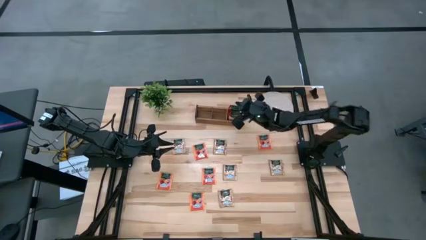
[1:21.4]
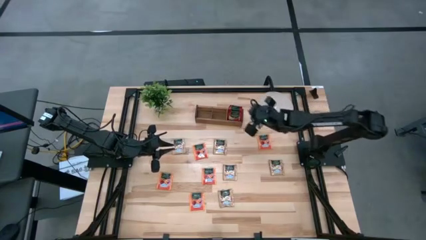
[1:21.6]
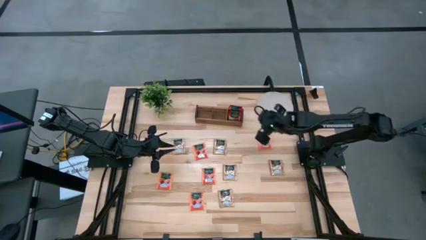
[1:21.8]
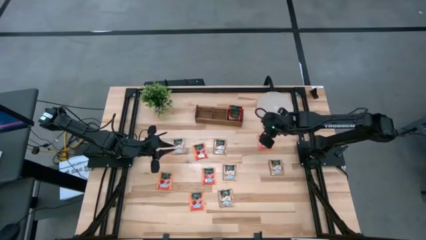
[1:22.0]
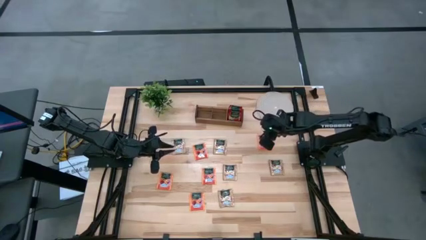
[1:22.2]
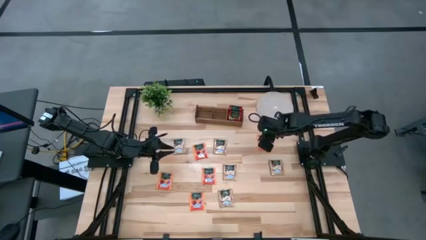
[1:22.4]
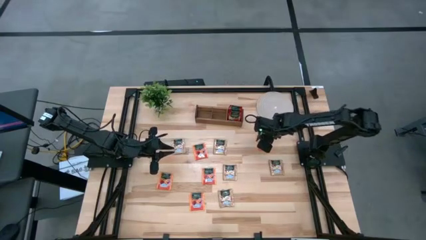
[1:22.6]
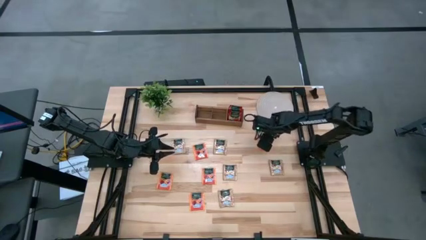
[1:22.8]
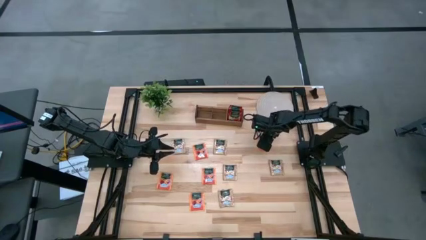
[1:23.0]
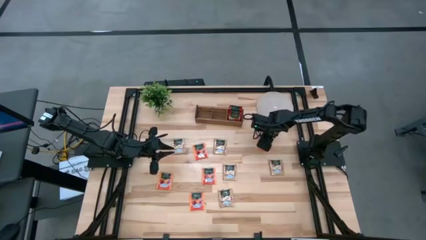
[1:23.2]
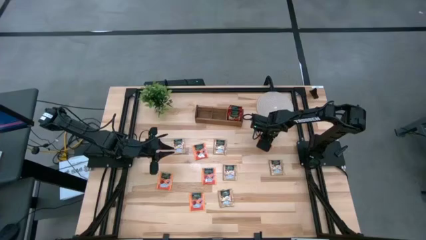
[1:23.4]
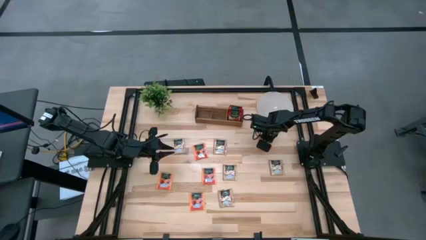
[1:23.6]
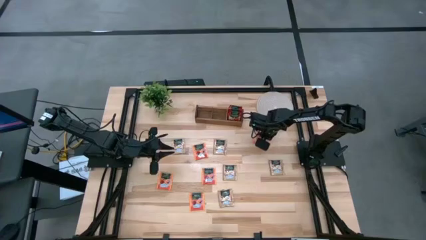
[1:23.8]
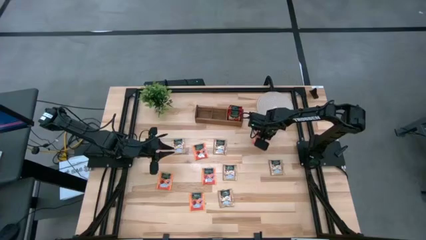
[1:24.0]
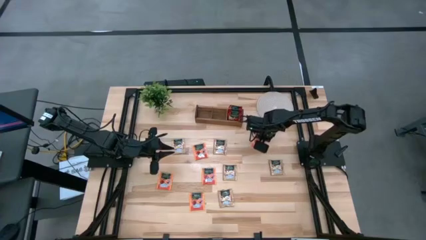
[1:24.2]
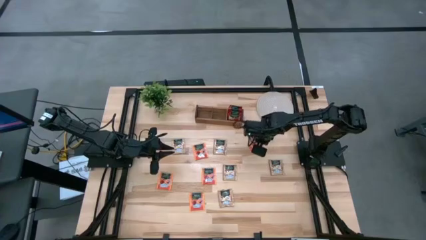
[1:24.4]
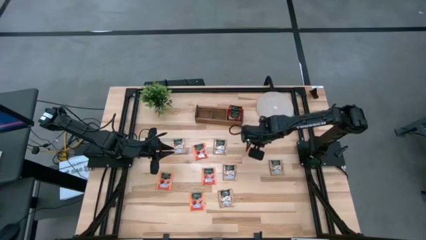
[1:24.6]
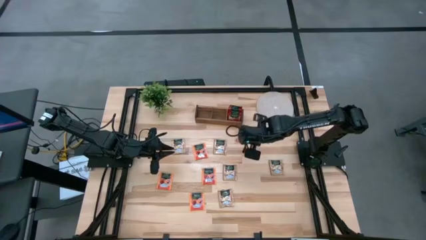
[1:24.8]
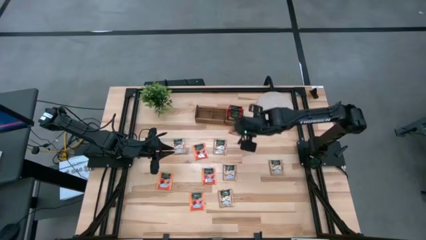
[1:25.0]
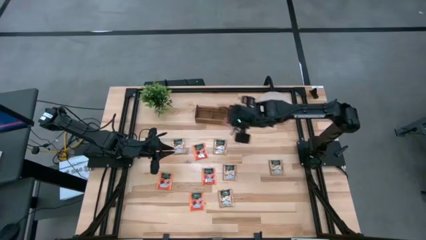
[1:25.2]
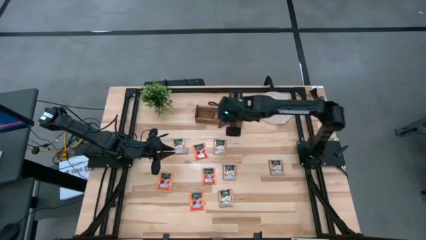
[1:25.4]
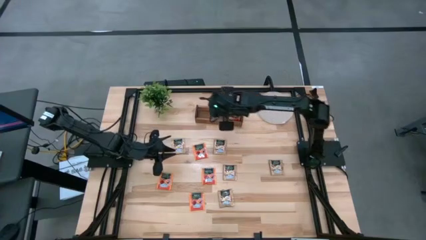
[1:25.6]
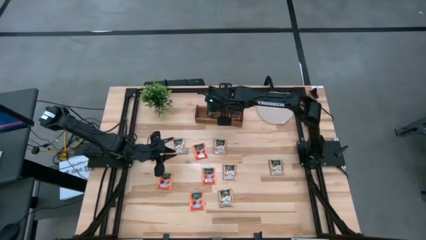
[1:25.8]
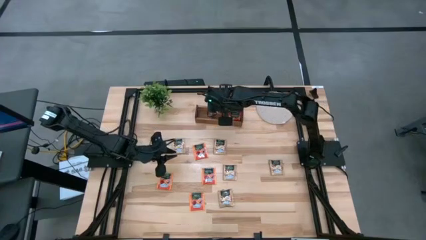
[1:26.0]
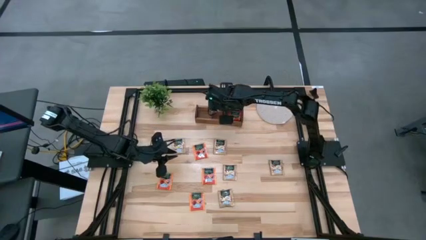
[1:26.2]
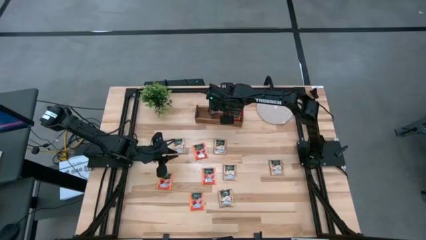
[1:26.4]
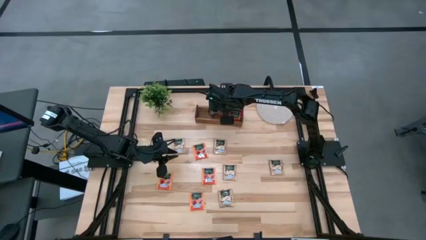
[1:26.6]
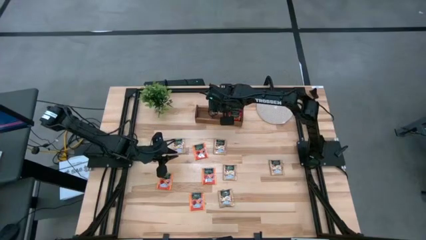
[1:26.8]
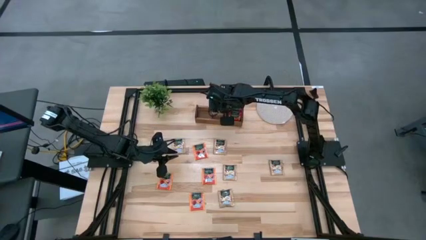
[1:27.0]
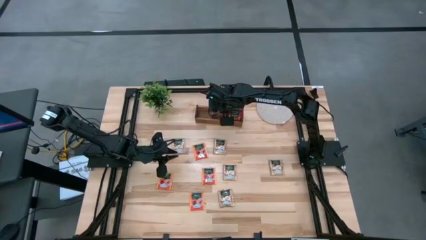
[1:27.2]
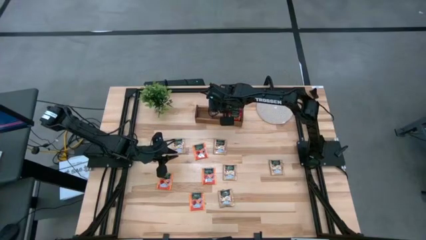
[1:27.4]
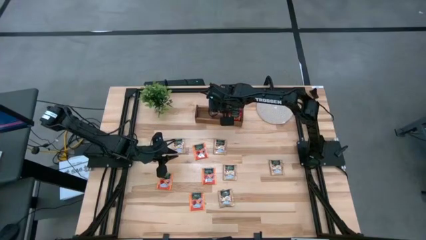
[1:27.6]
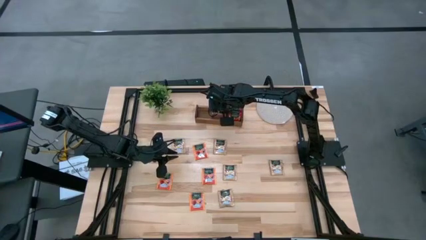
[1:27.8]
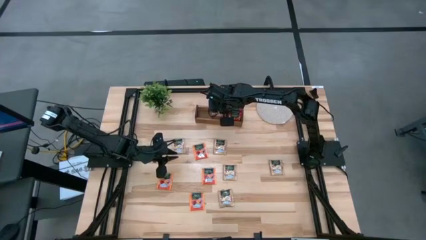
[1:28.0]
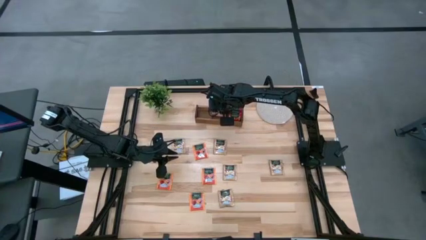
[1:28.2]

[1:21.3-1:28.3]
Task: Pick & Place Tea
Put the orange tea bag into the middle section of the wooden organizer

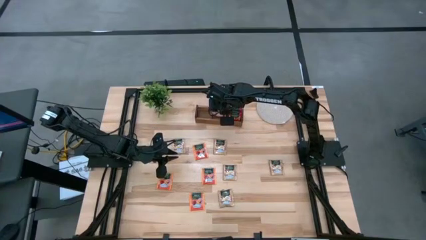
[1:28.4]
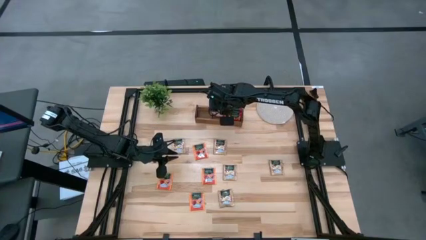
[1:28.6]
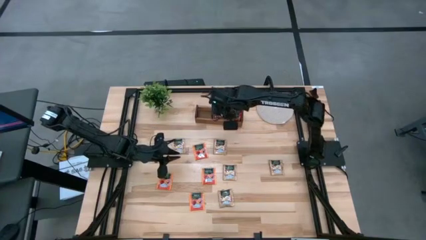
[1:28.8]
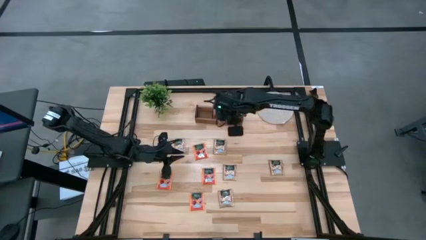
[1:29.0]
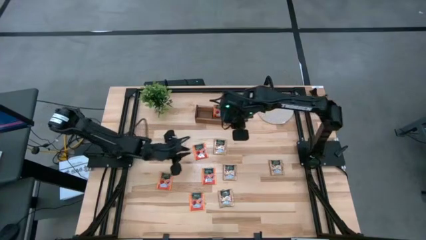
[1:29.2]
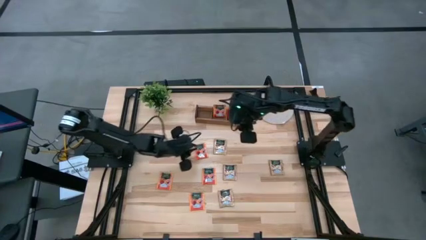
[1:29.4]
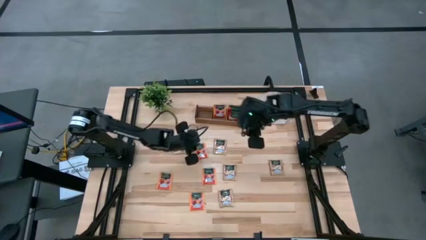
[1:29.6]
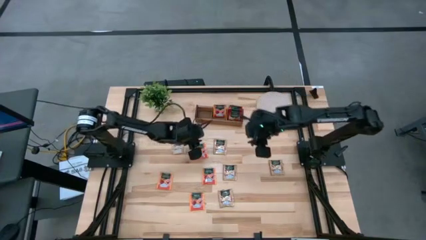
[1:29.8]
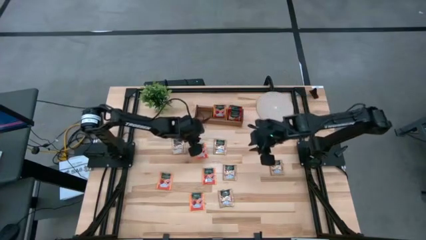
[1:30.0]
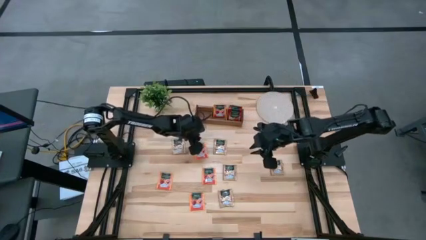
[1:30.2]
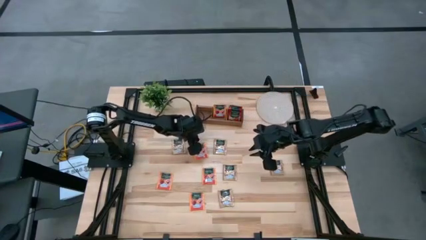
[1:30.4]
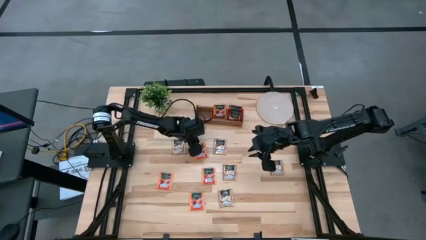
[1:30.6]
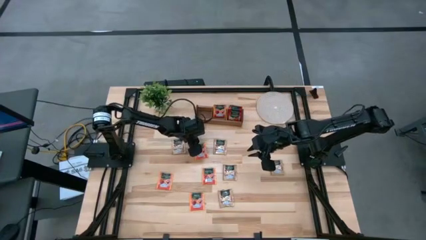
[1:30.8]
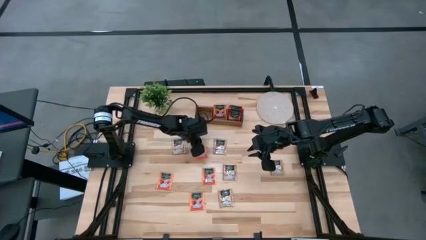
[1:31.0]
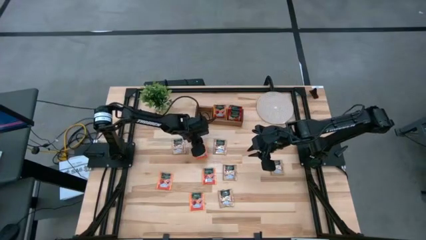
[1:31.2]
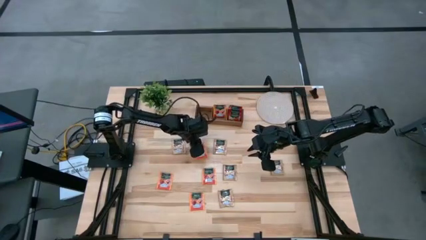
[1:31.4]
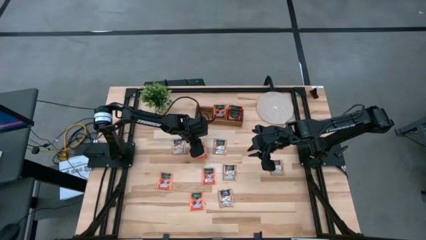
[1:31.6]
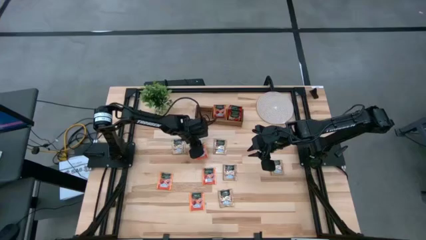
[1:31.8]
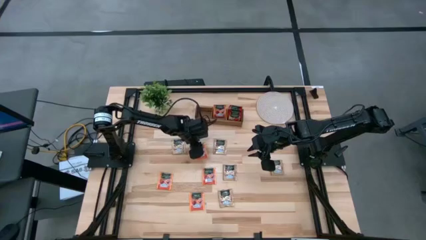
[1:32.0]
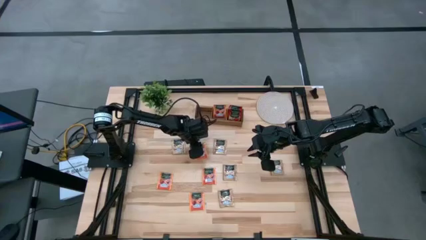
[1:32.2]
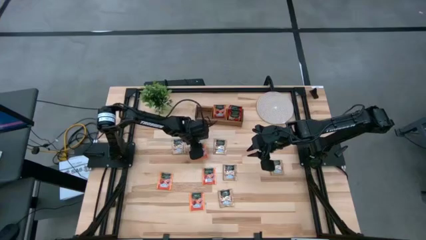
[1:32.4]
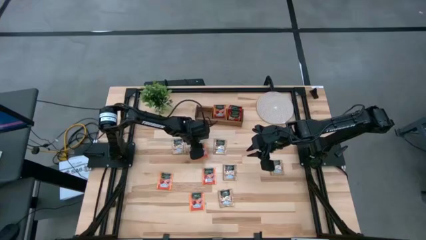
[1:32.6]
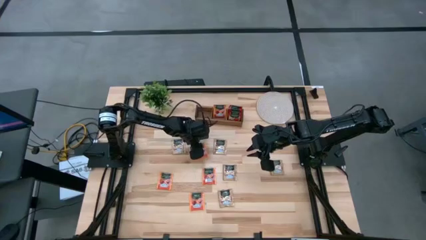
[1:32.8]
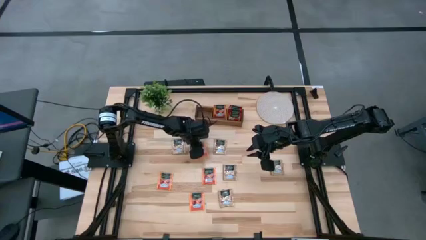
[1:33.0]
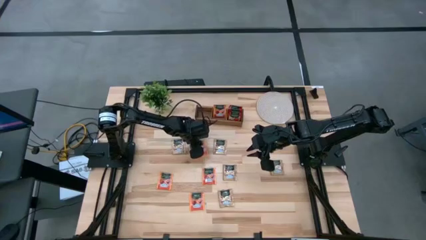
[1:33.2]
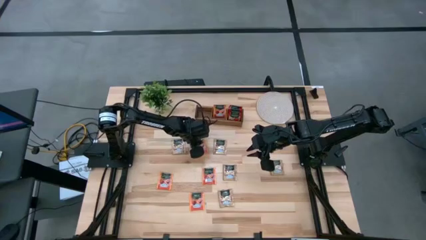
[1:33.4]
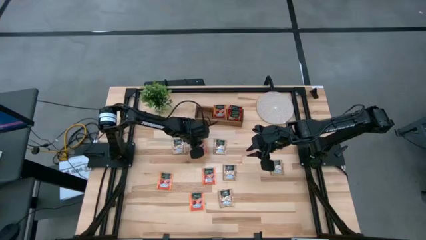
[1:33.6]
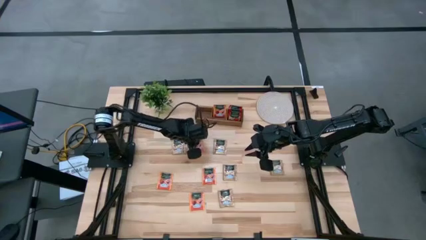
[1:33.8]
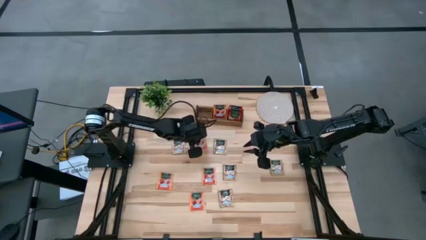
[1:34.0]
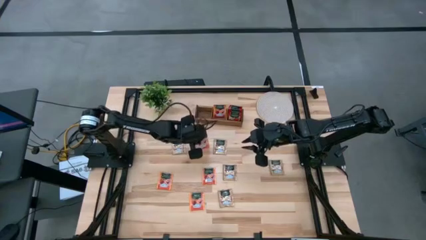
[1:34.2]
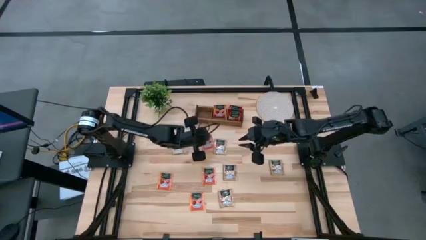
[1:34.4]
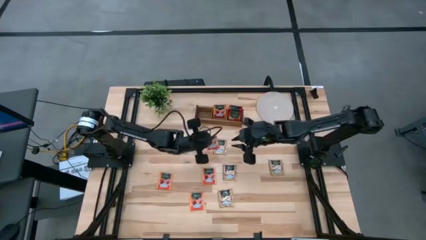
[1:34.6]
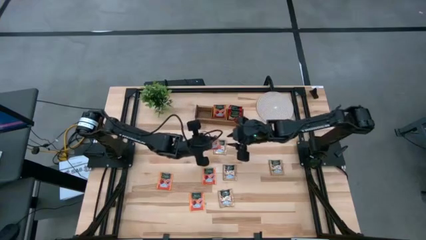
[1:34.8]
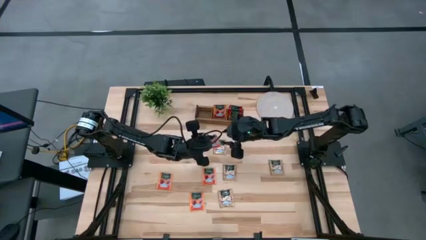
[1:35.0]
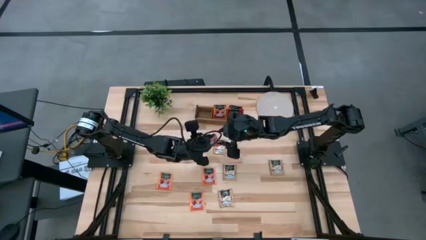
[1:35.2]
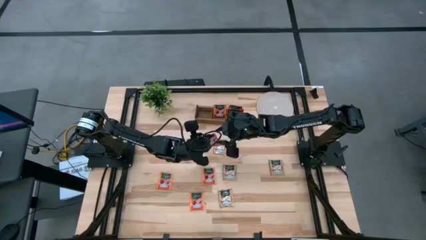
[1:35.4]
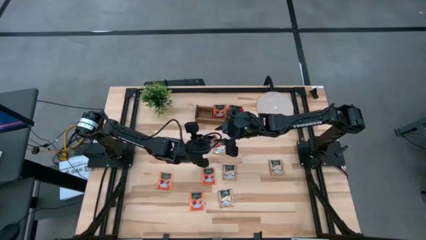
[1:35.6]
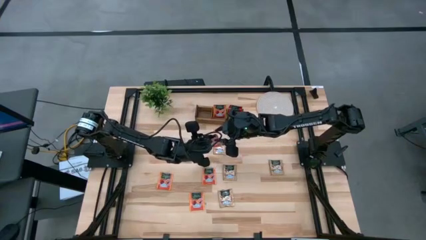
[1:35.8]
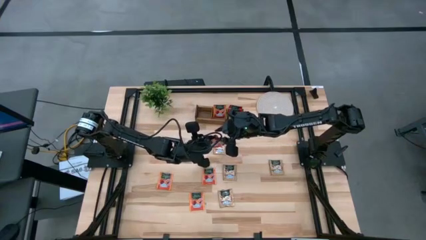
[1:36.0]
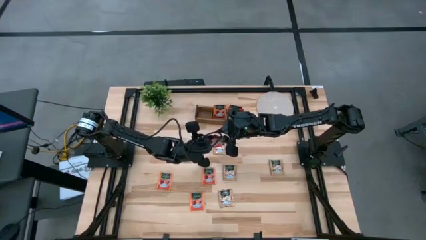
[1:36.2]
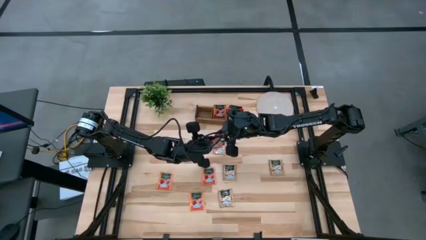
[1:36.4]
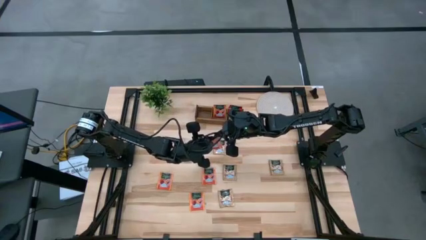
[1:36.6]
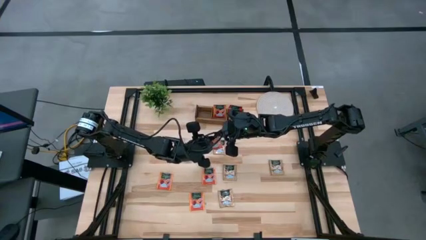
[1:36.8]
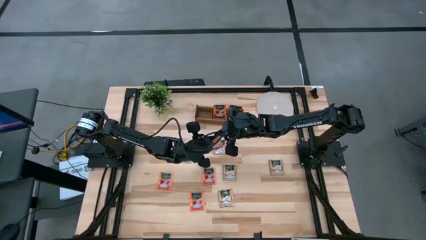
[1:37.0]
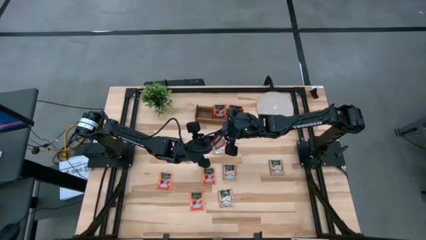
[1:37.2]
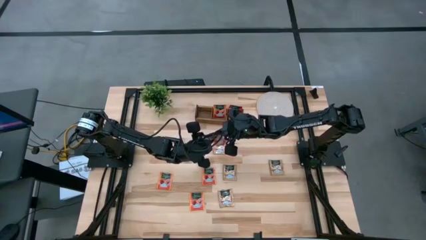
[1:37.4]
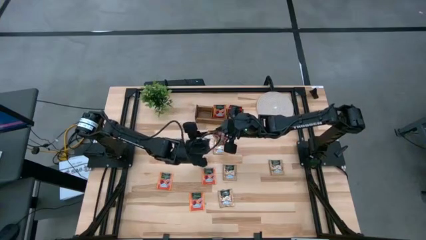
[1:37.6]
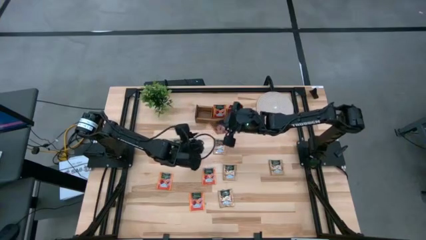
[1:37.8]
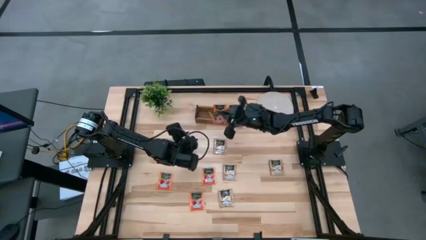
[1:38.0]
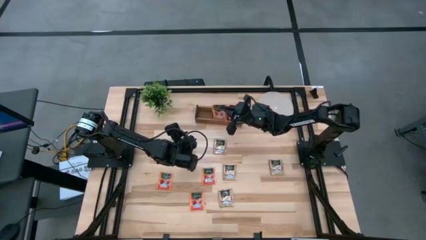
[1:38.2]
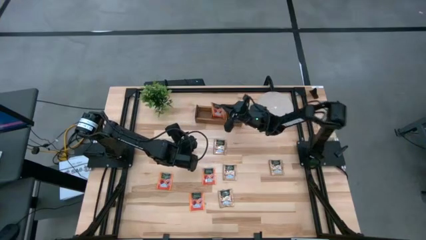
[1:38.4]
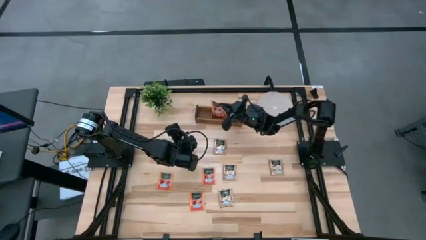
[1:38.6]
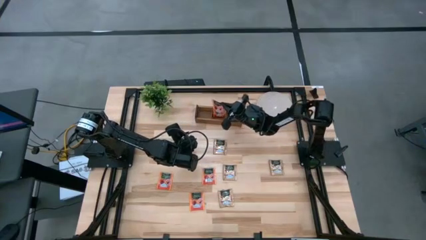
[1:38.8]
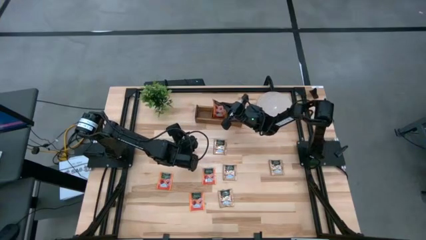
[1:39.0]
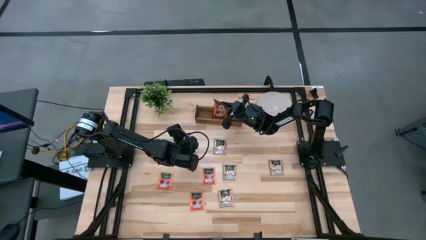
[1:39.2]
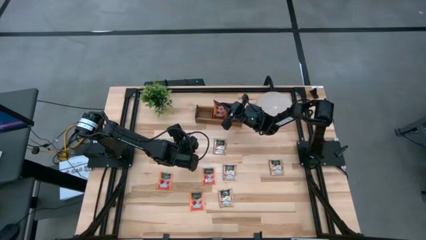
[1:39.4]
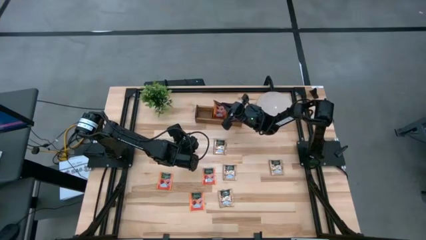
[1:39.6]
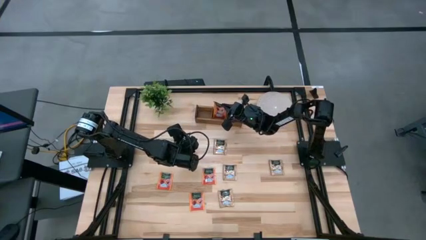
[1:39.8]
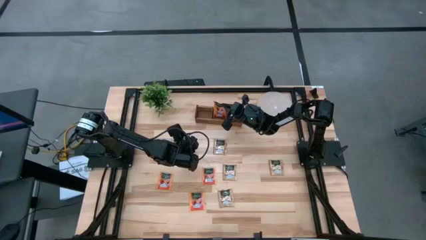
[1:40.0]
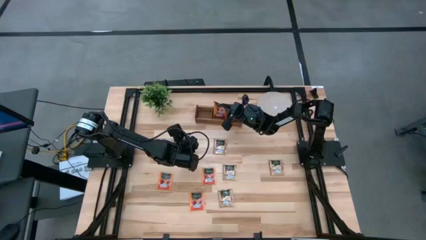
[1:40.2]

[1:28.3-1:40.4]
Put the orange tea bag into the middle section of the wooden organizer
